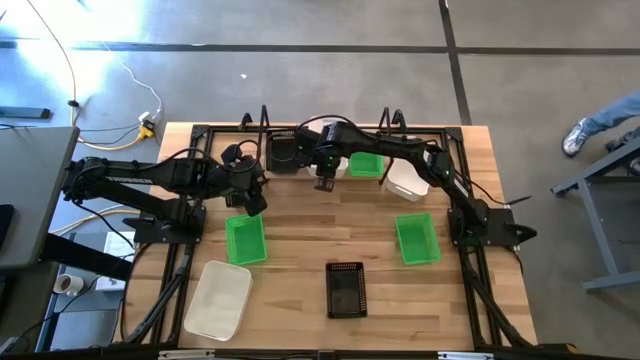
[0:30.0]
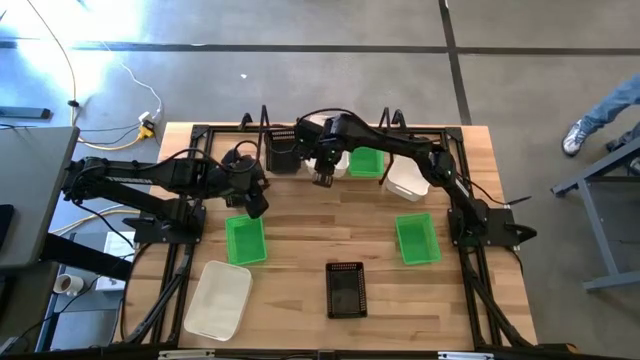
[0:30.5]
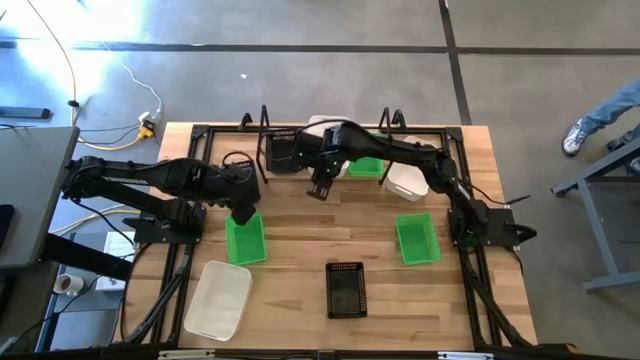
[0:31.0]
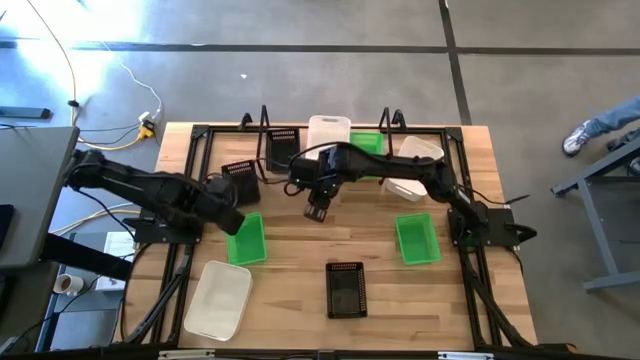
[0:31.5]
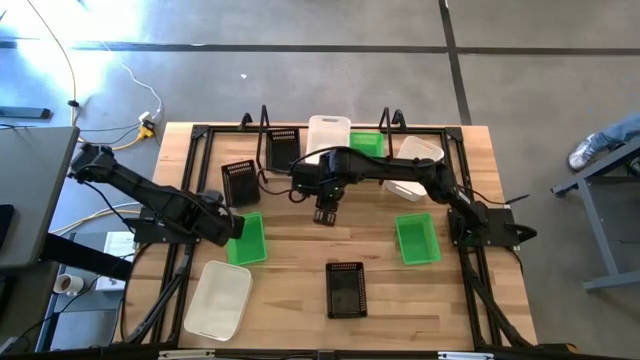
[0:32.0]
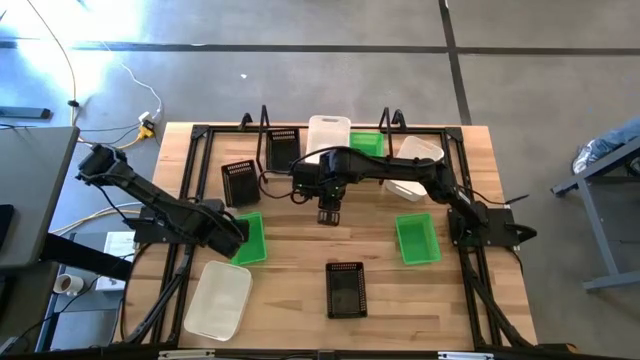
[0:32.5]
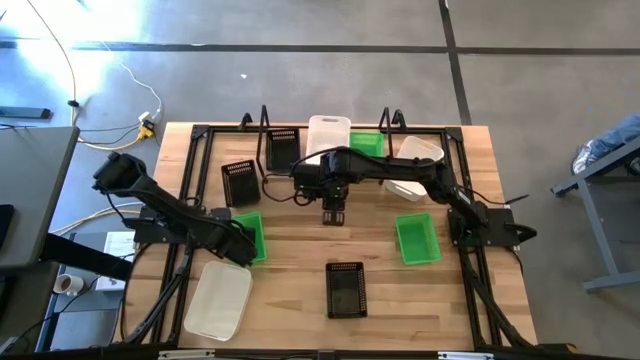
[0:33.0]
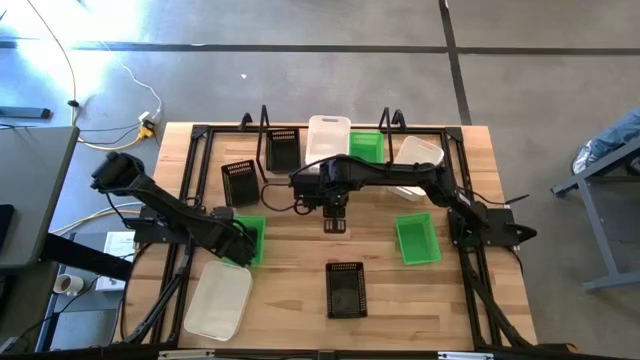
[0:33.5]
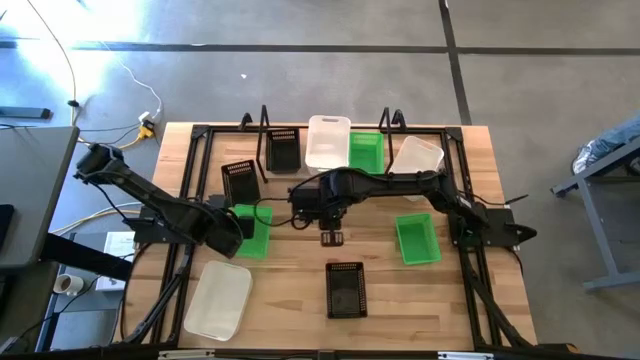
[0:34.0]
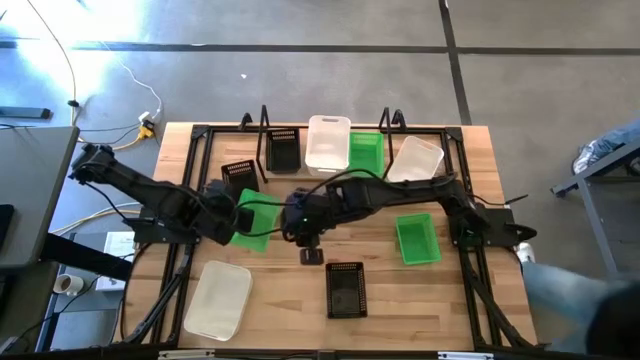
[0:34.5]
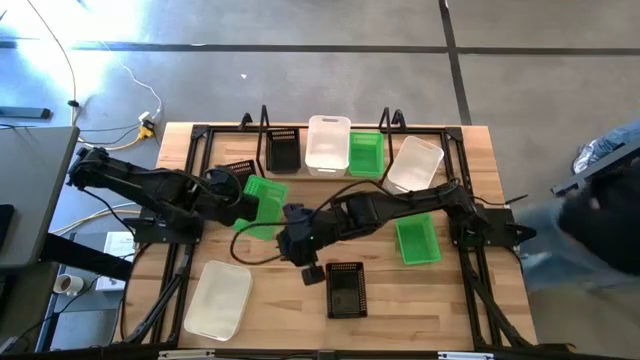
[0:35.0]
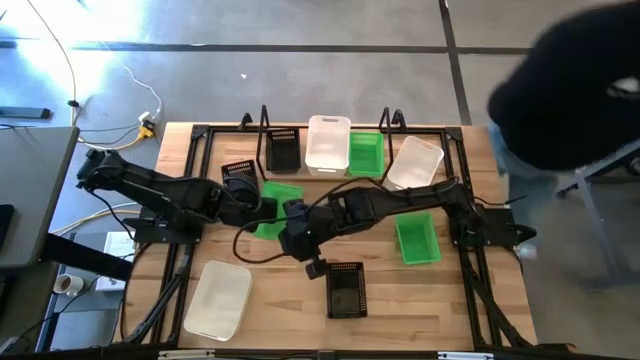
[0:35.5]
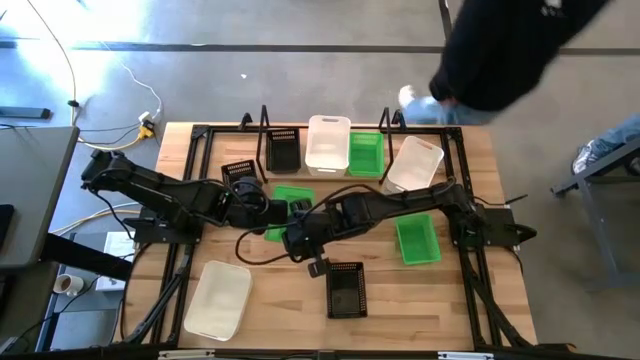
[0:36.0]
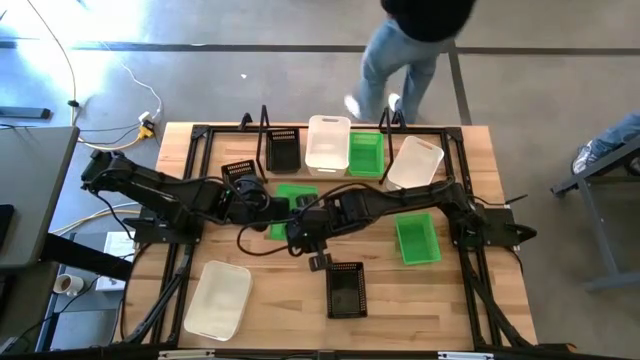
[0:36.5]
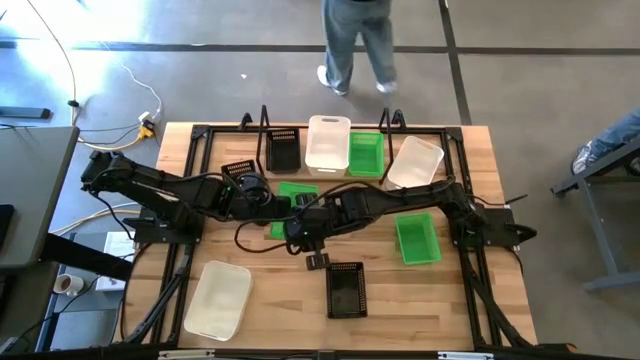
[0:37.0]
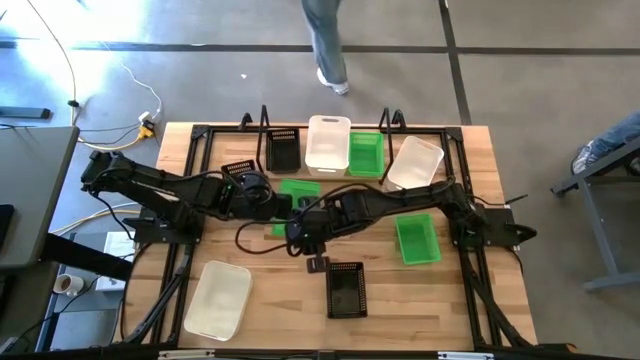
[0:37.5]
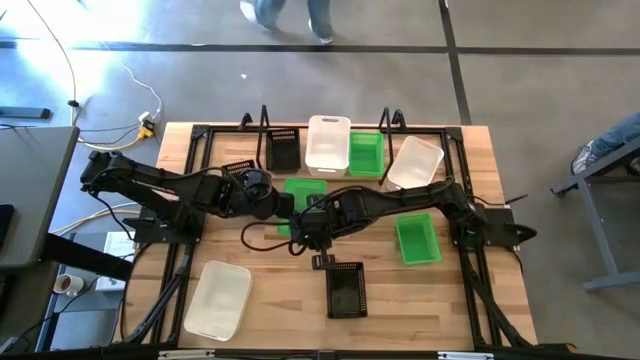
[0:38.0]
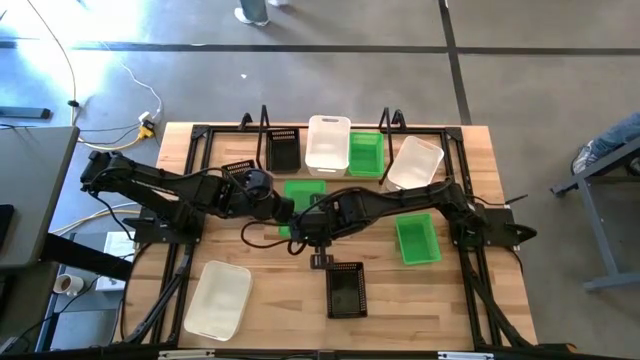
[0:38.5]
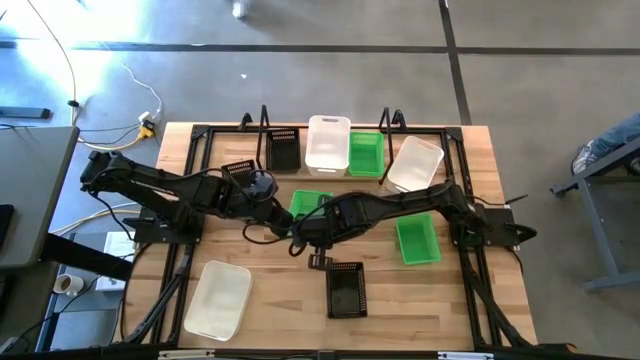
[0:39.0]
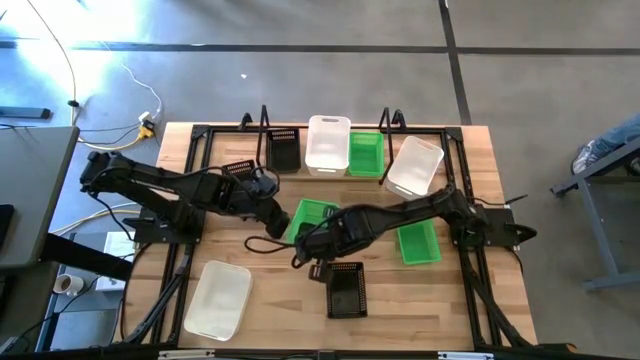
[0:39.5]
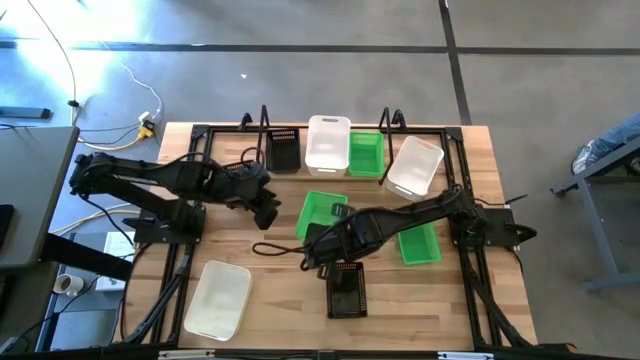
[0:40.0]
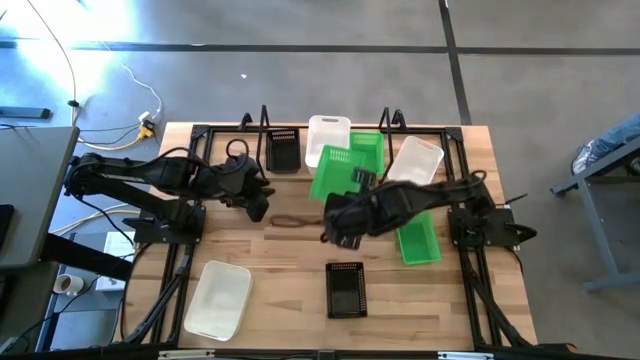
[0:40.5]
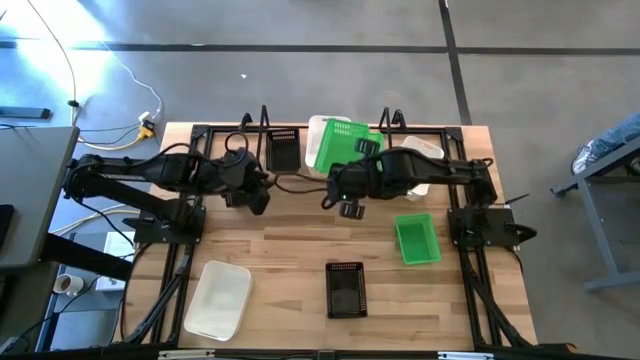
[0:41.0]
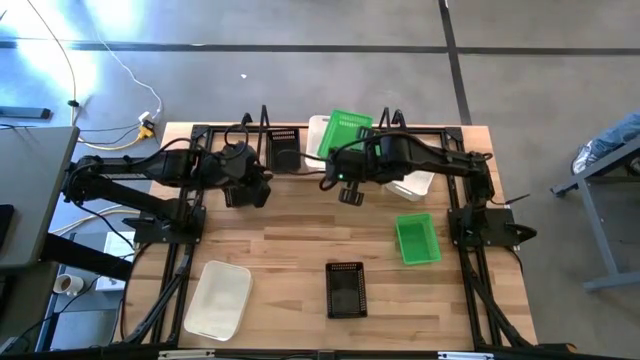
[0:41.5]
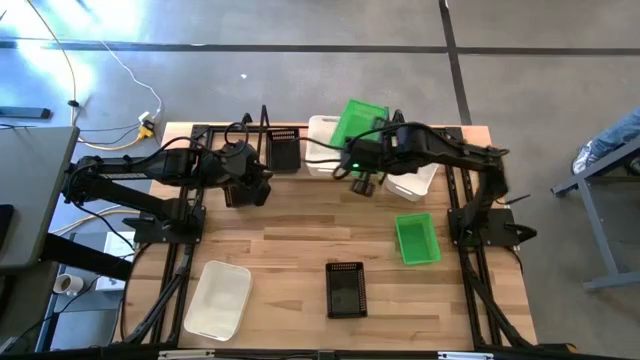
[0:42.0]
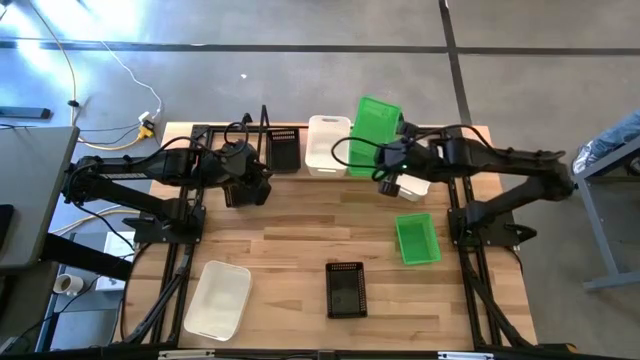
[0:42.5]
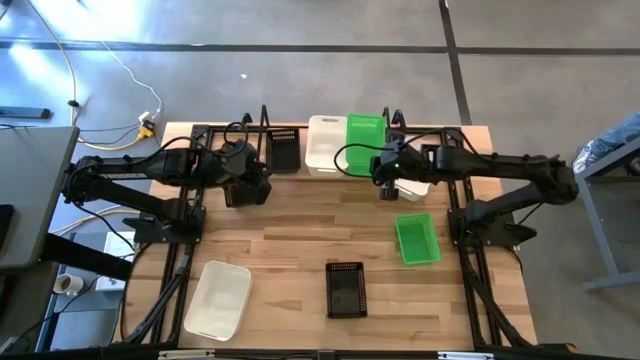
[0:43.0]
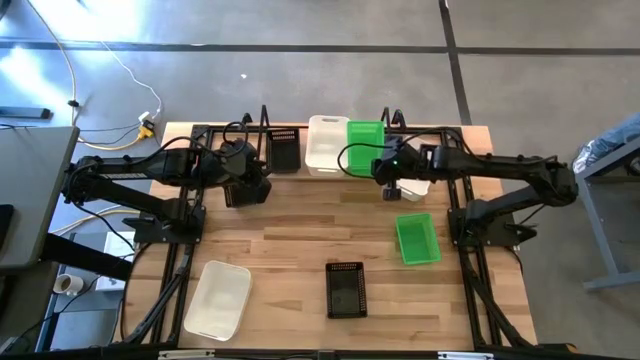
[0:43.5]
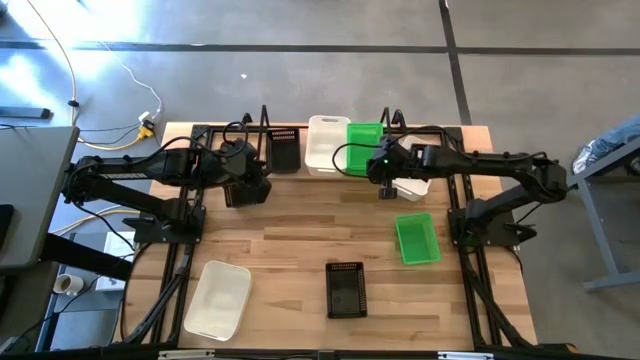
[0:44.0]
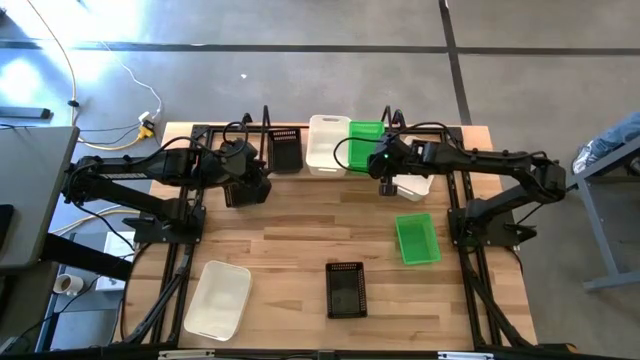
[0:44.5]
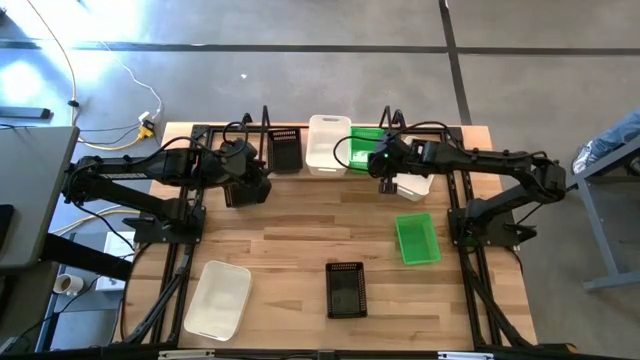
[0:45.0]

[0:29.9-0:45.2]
Task: Stack baskets on shelf by color
Stack the left green basket on top of the other green basket on the shelf

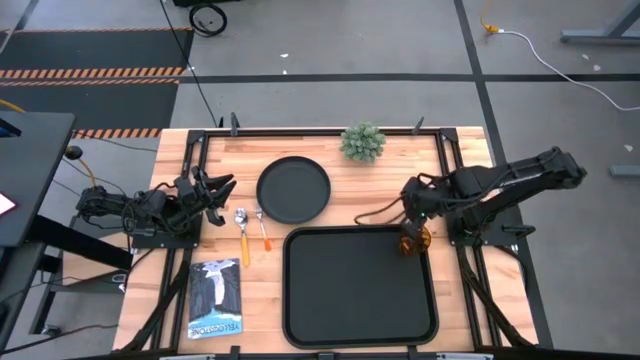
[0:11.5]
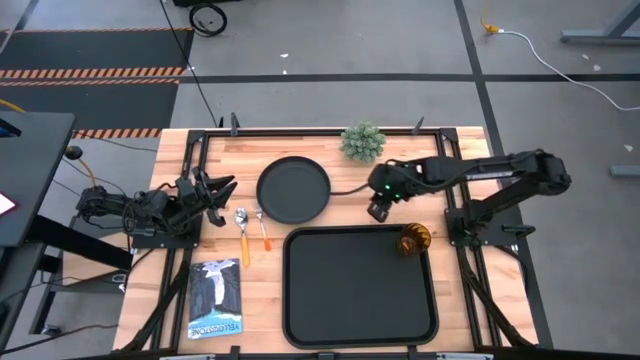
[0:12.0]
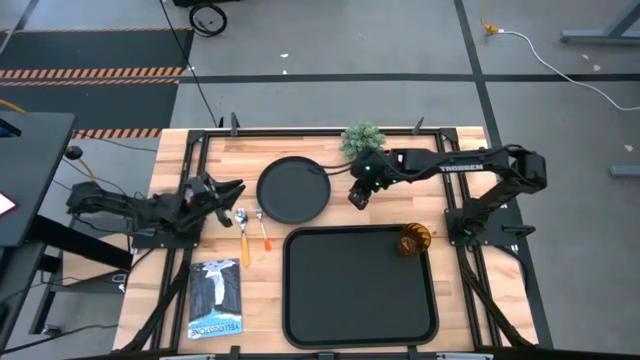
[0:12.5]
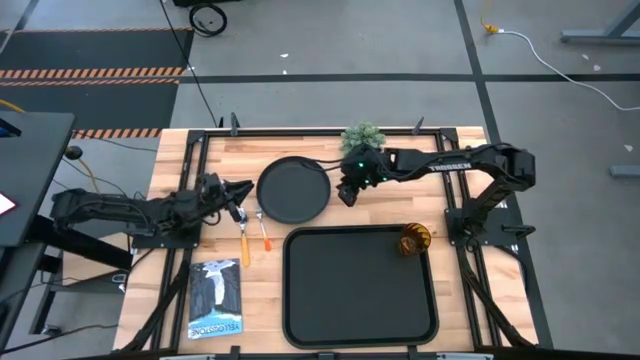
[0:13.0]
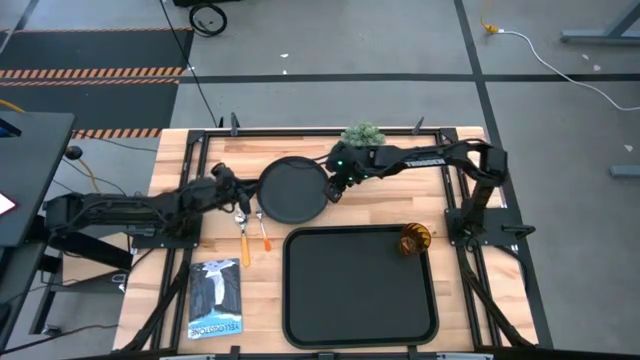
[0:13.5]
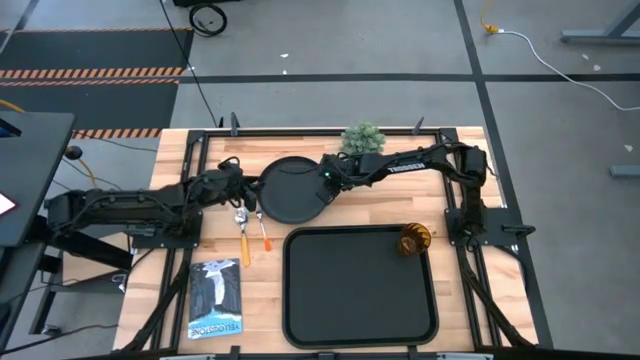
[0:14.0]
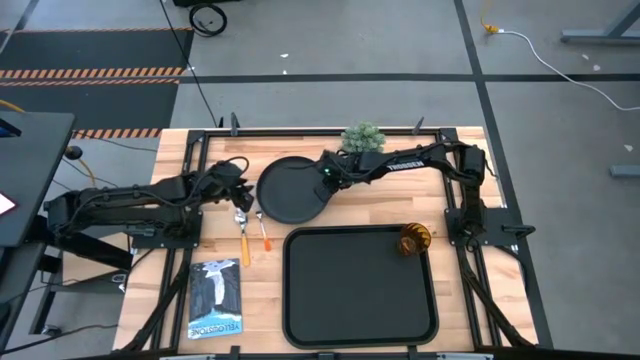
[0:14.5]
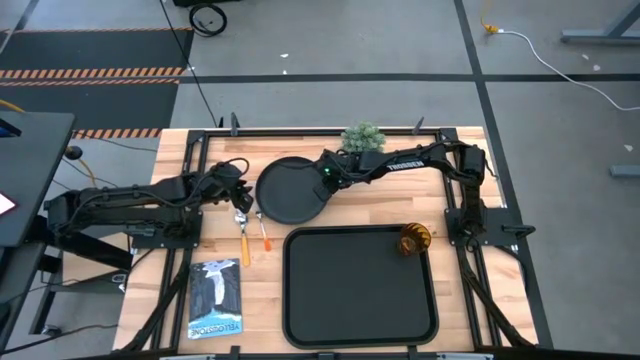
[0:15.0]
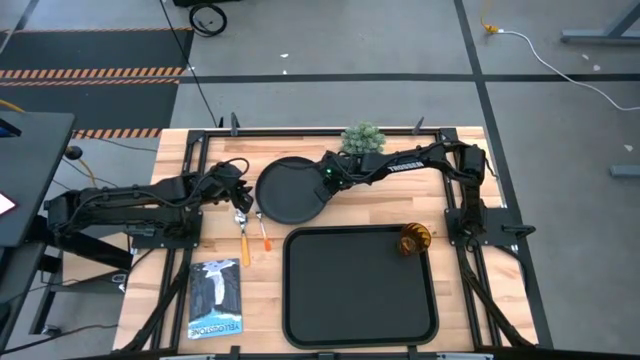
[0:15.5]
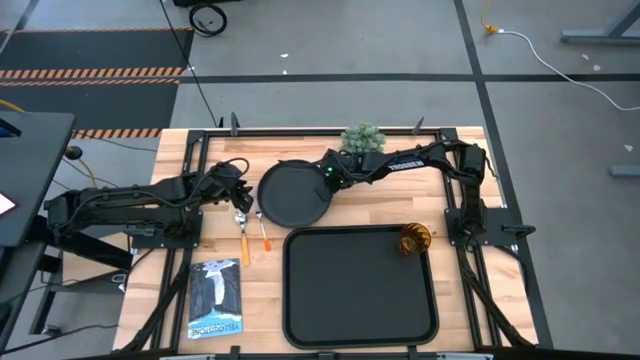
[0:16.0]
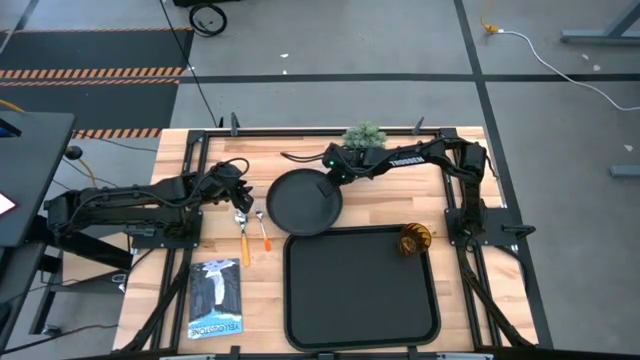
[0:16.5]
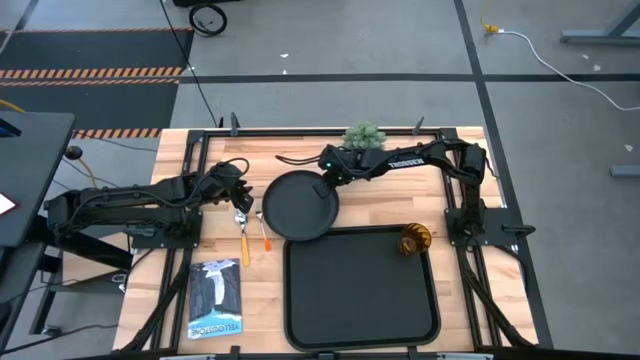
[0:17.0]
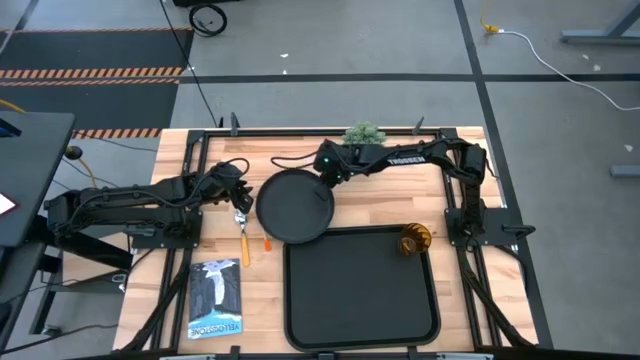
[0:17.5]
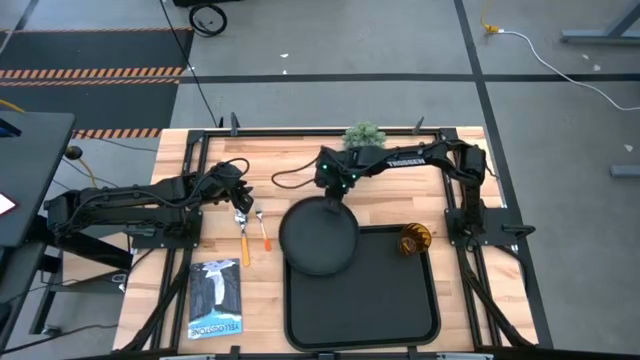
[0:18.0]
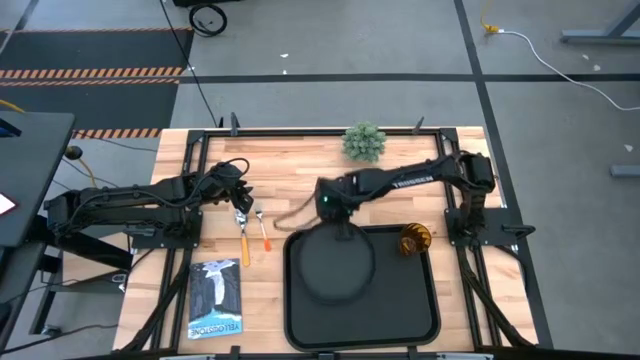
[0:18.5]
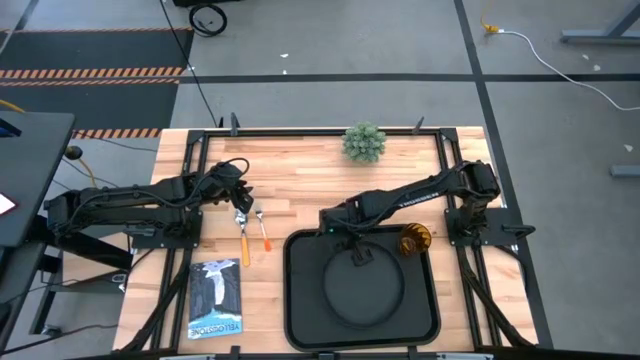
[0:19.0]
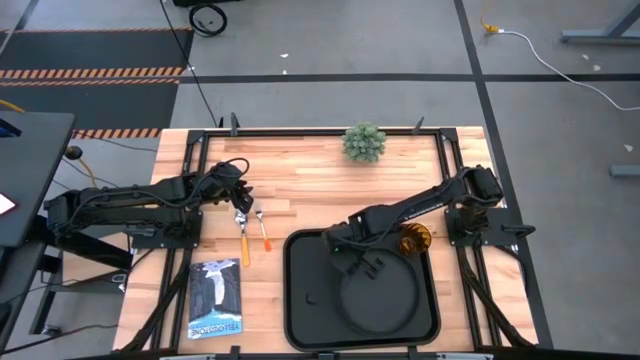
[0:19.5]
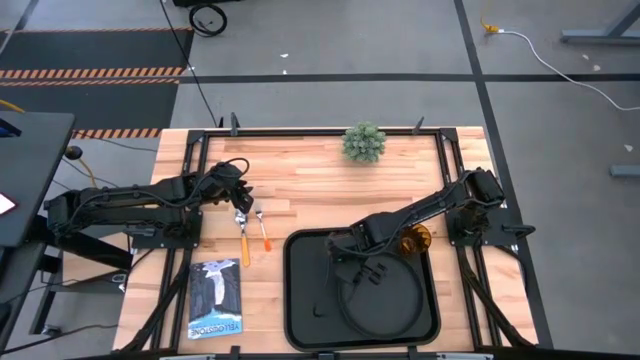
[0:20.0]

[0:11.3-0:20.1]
Task: Pick and place plate/cup/fork/spoon on tray
Put the black plate on the bottom left of the brown cup
